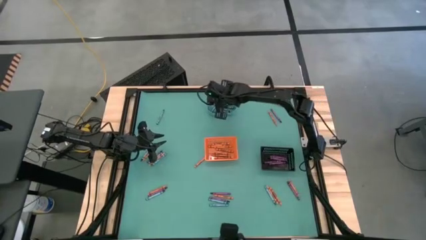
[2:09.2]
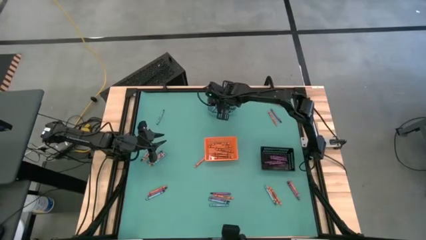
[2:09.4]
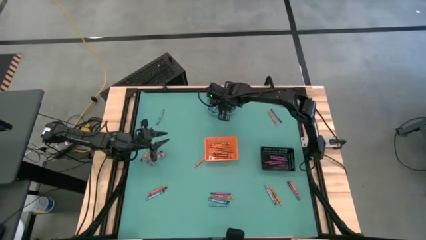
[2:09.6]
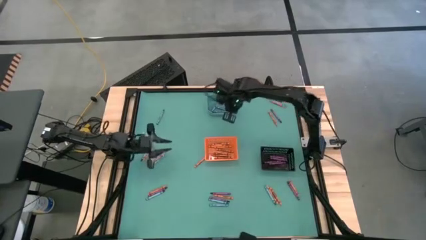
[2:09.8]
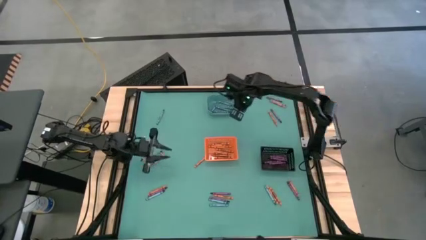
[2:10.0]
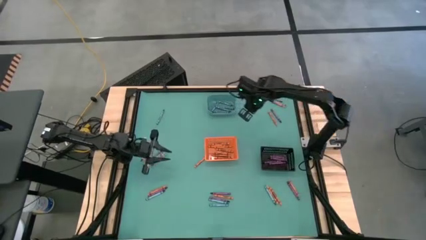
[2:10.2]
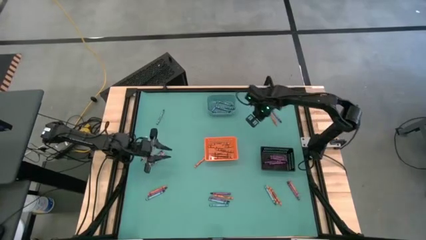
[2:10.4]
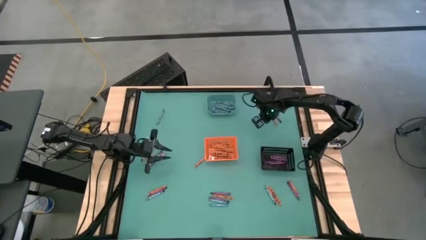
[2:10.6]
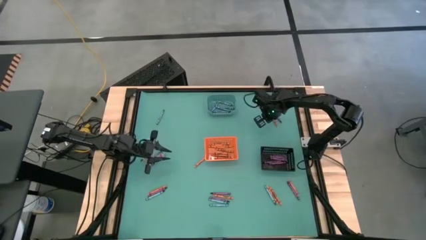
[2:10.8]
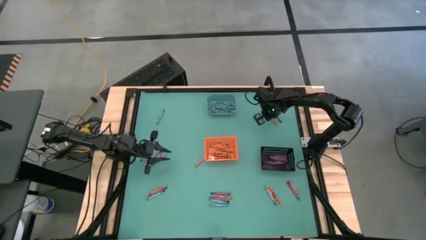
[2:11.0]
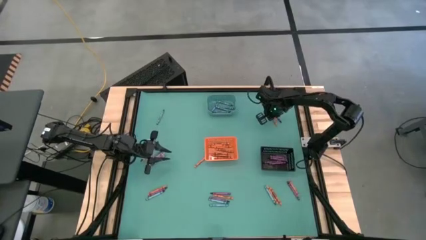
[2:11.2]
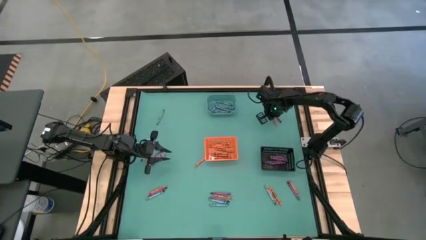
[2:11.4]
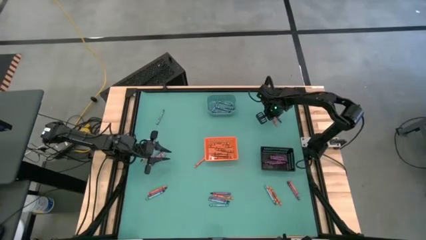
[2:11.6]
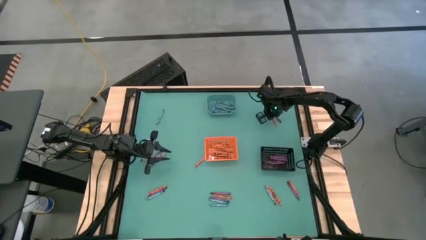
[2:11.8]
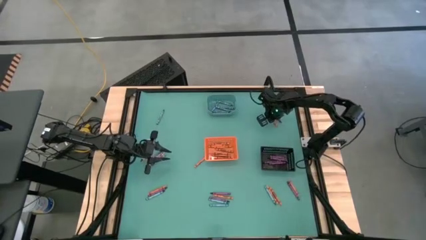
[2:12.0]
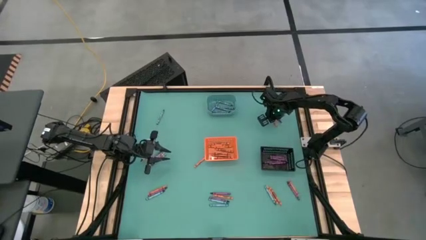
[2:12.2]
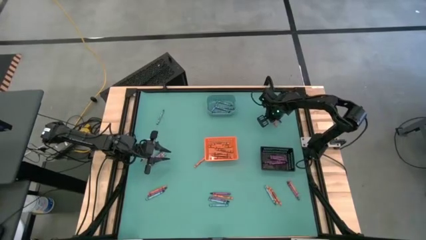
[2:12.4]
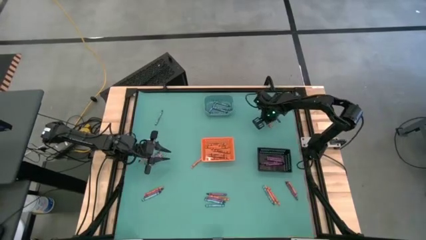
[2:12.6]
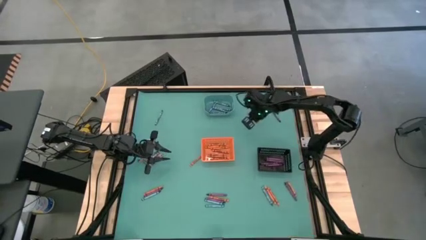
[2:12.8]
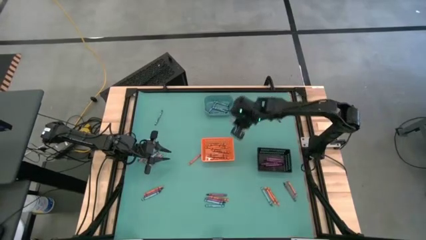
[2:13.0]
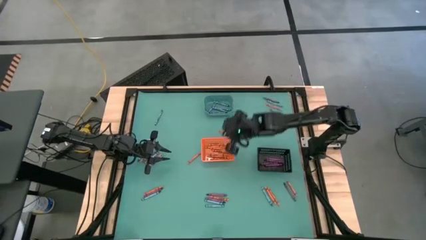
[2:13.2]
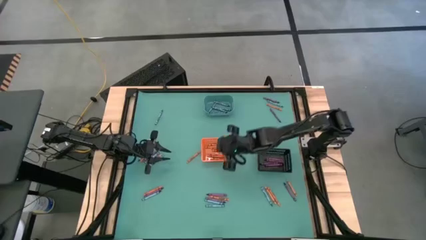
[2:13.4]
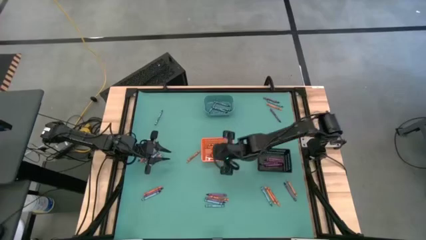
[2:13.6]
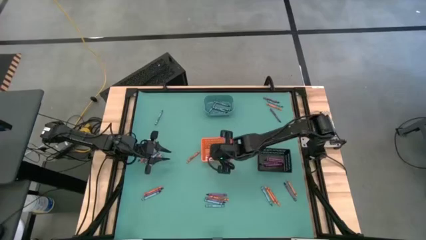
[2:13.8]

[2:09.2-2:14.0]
Task: Sort crayons
Put the orange crayon into the orange bin

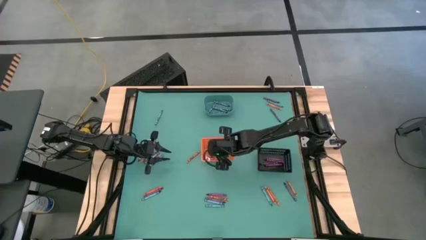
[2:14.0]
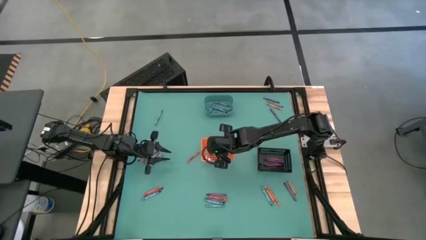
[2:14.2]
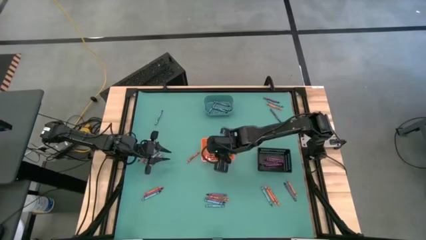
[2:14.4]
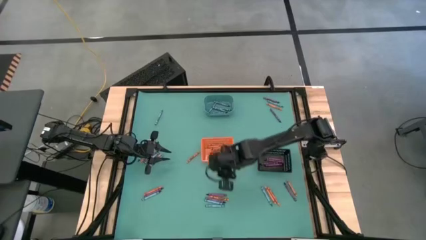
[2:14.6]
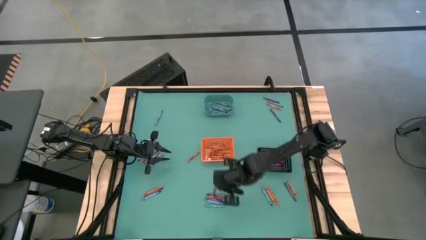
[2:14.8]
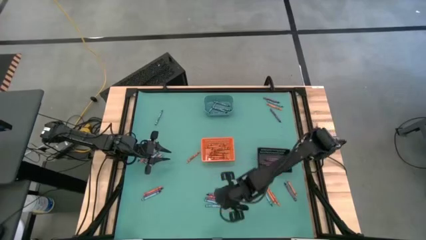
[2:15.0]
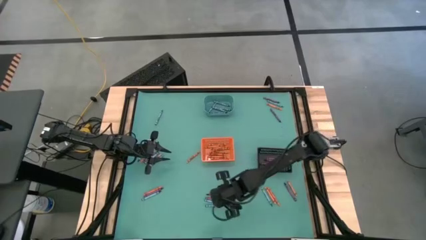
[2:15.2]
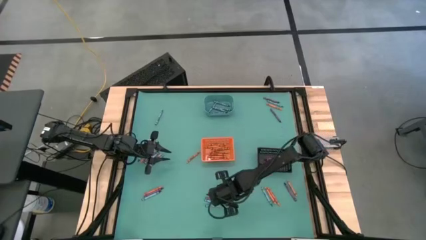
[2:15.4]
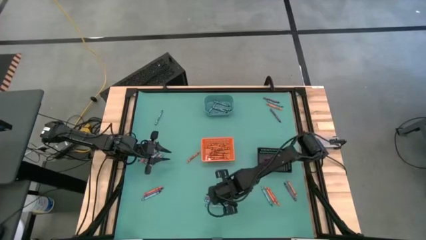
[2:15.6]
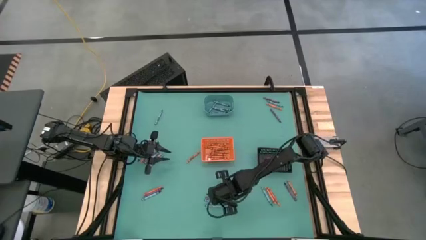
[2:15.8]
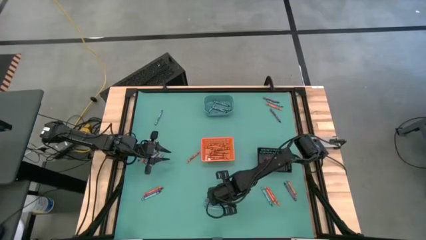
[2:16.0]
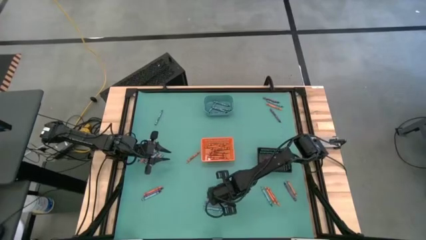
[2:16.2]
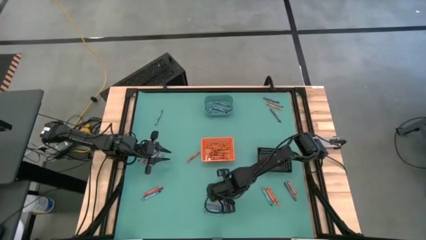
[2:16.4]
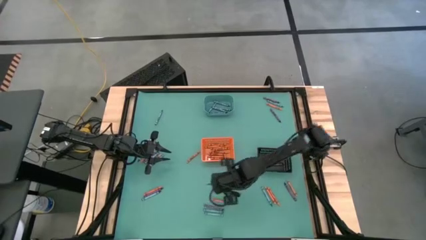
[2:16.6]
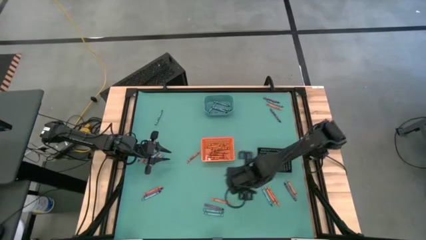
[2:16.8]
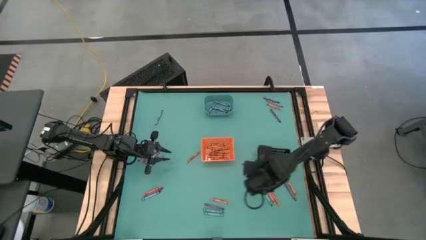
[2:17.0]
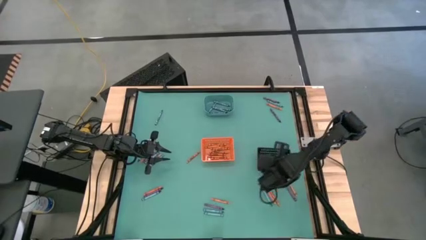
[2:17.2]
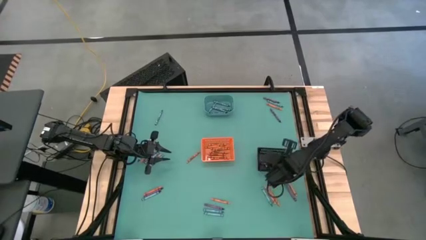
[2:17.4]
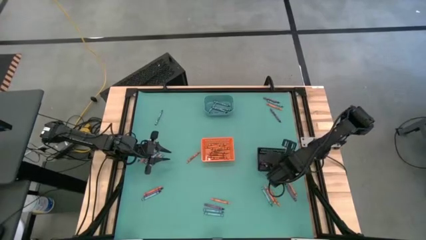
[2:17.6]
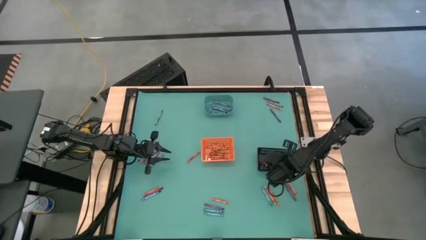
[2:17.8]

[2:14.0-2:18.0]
Put the violet crayon into the black bin

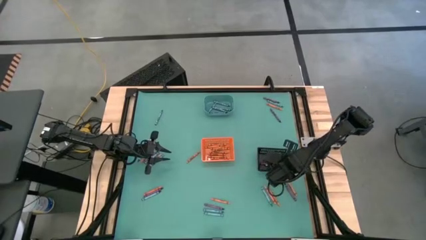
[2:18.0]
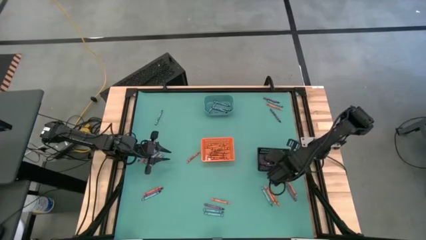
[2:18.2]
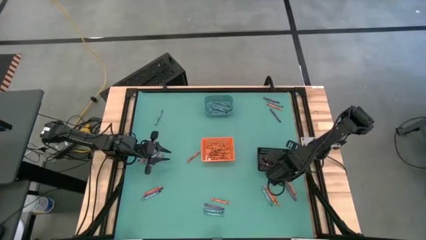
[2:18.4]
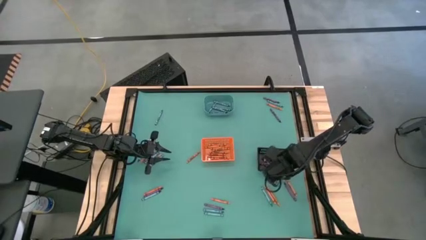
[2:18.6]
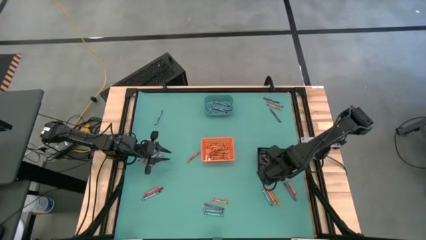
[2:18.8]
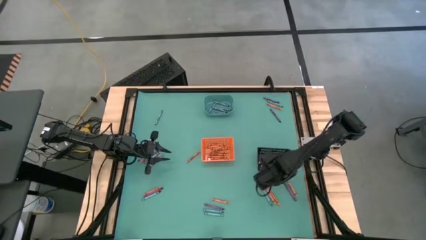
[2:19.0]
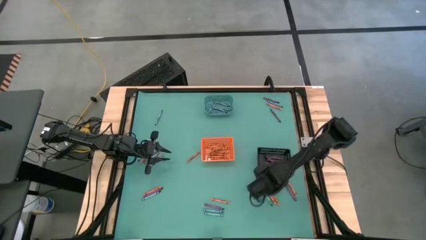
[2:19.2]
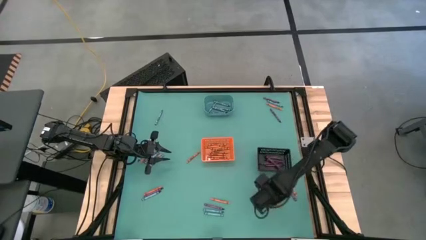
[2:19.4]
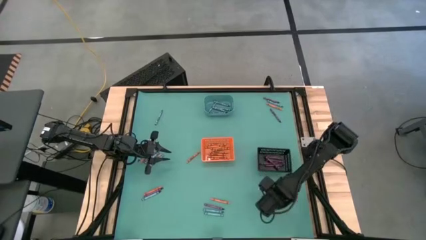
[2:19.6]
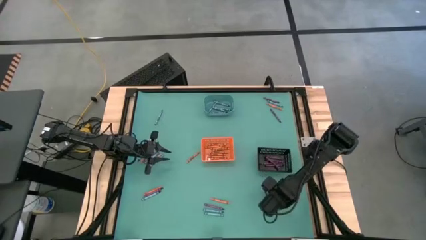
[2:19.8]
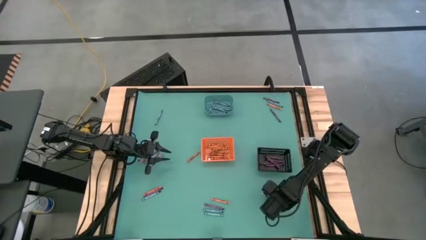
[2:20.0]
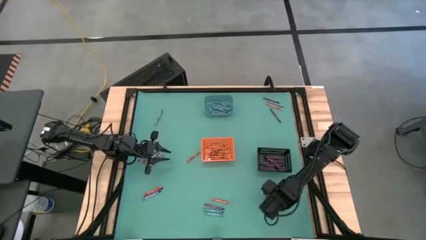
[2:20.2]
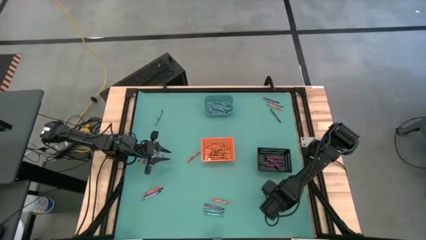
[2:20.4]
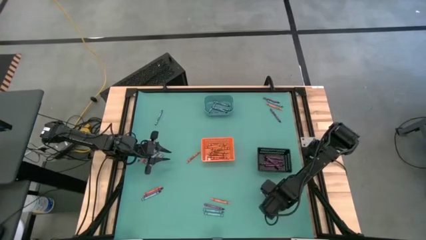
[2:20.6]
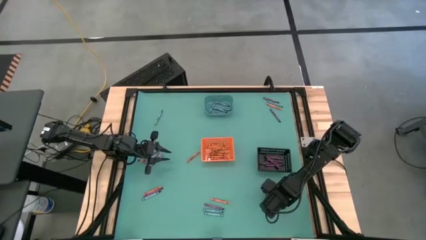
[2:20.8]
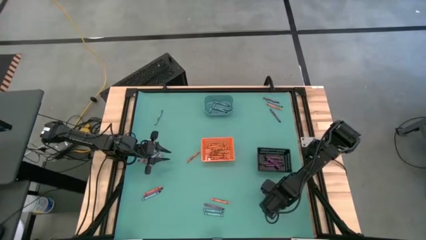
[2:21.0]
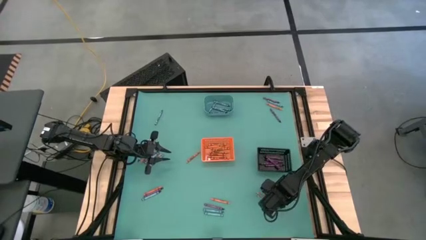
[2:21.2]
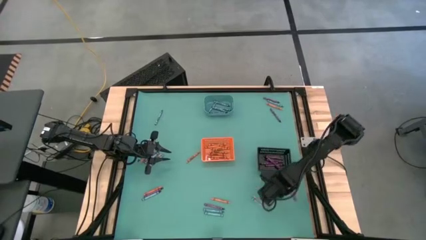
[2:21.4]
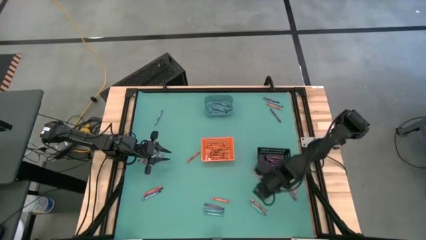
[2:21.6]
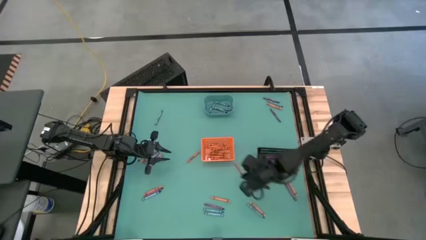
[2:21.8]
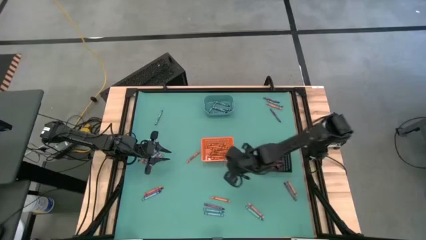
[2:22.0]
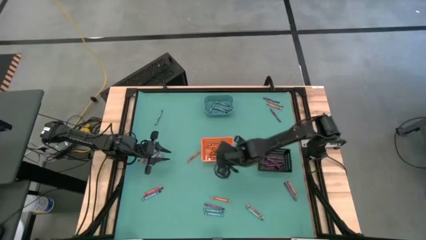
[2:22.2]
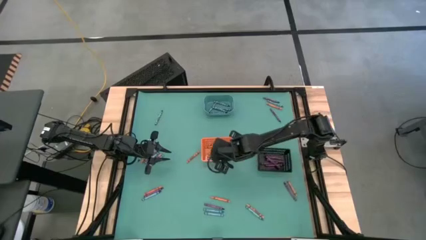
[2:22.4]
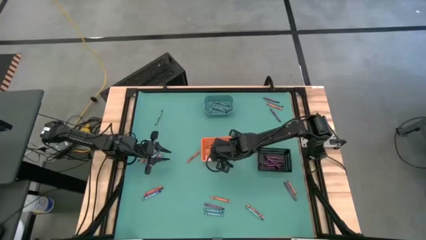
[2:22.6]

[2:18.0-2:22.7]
Put the orange crayon into the orange bin

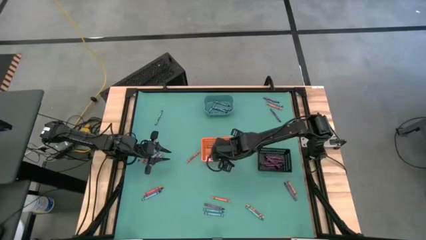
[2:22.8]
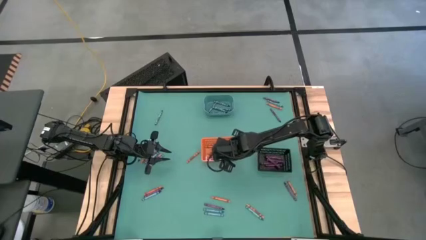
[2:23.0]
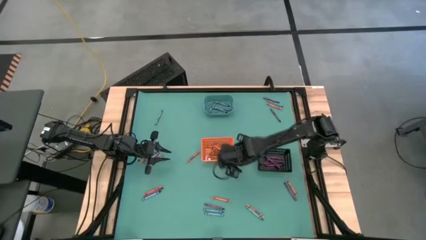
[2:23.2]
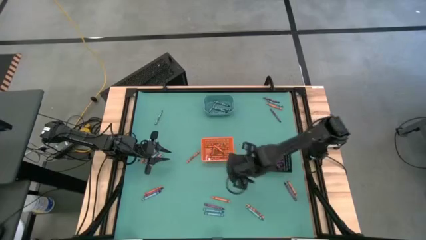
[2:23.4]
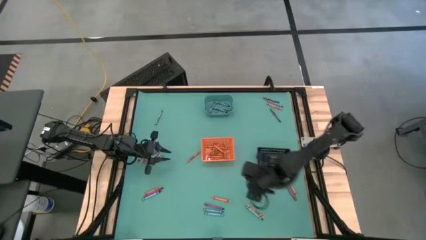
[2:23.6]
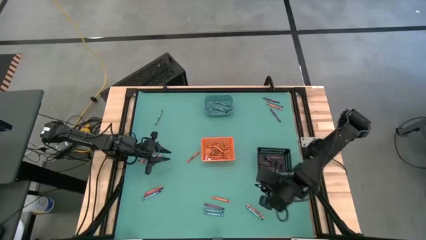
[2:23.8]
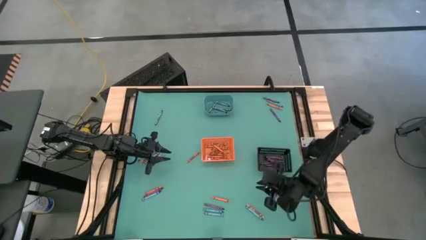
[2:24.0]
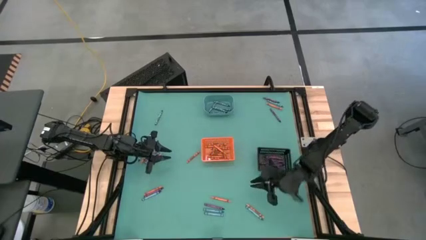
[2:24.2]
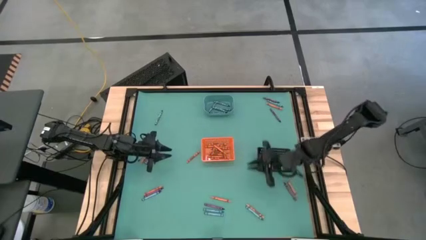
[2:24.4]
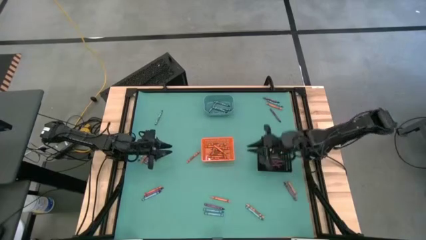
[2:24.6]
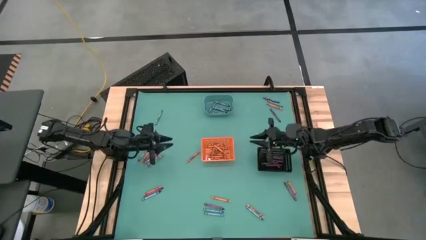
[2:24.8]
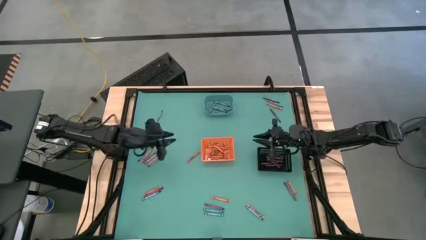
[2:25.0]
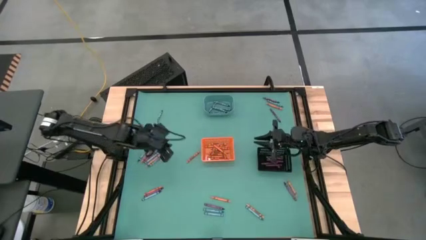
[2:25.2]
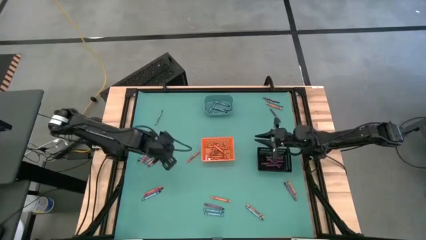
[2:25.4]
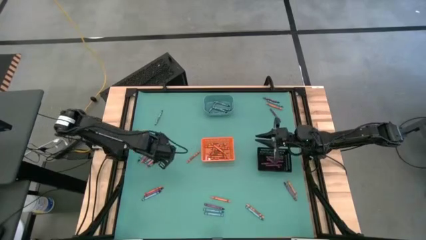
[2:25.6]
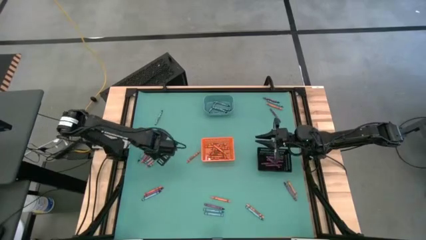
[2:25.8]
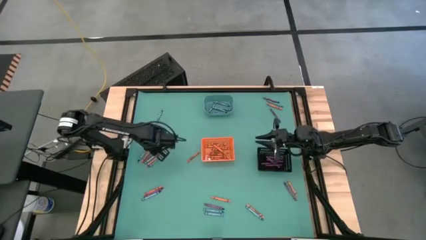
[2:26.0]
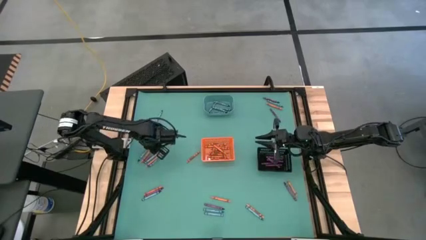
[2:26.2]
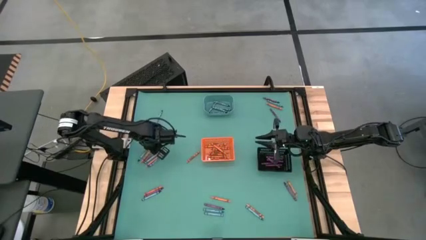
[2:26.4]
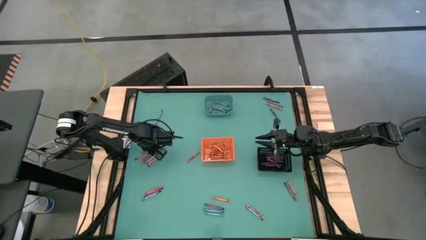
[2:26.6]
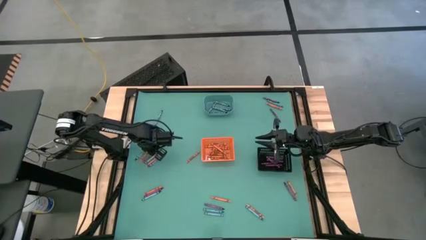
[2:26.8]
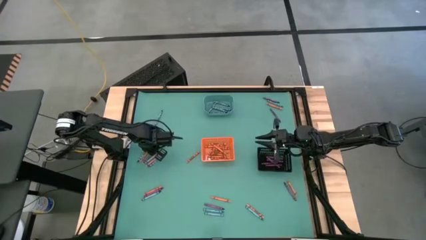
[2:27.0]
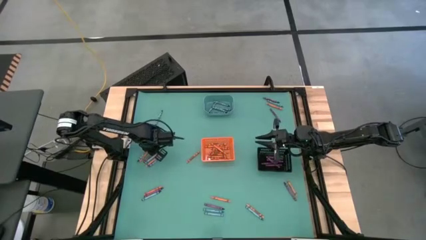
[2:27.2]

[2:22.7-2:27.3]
Put the orange crayon into the orange bin
